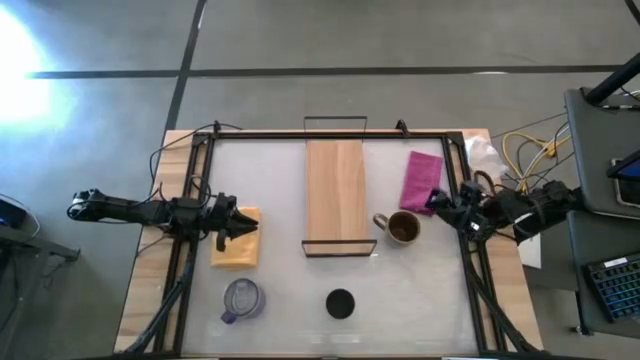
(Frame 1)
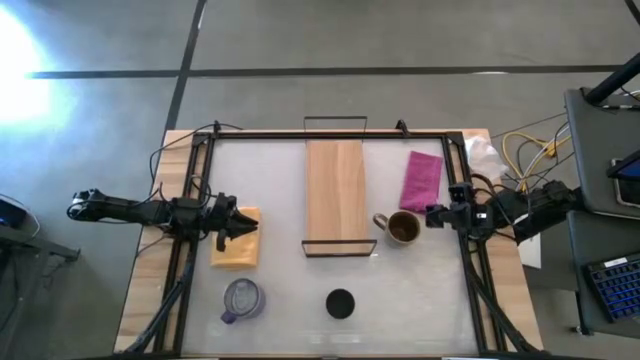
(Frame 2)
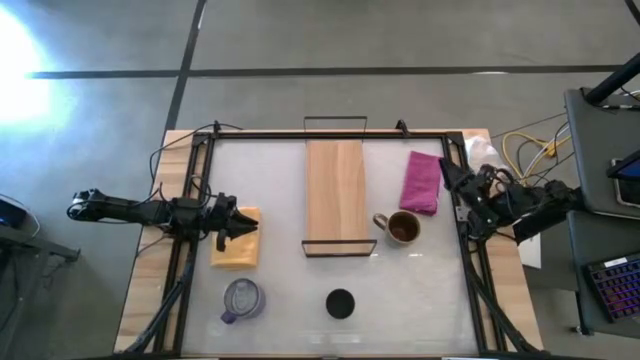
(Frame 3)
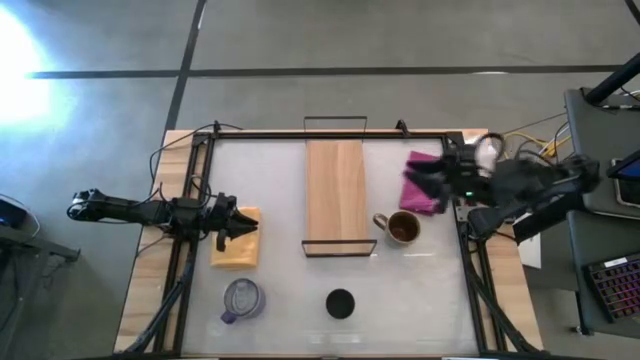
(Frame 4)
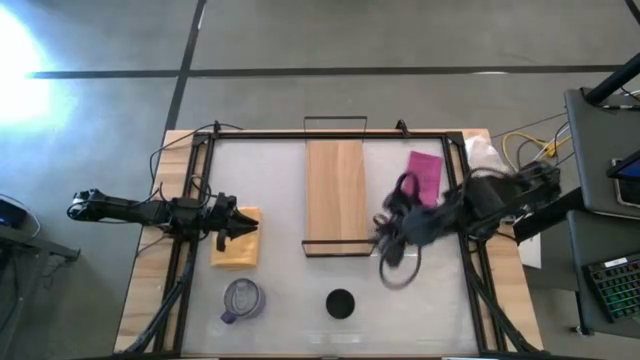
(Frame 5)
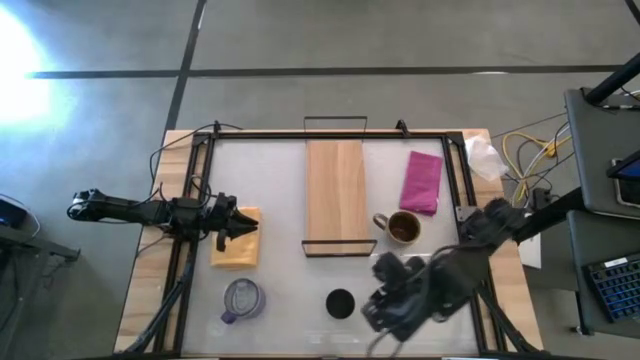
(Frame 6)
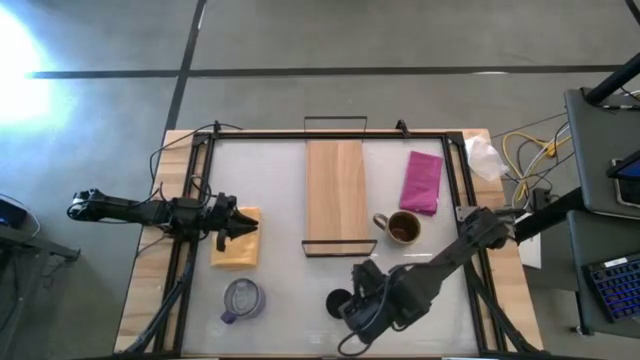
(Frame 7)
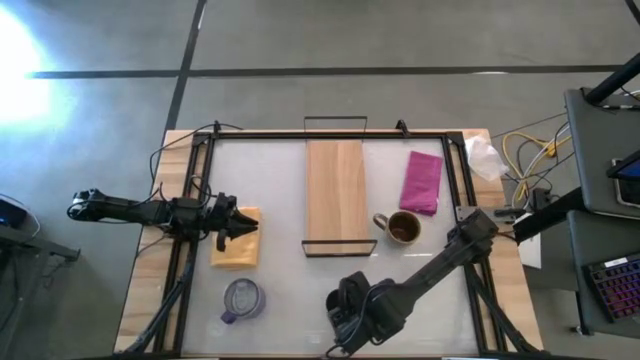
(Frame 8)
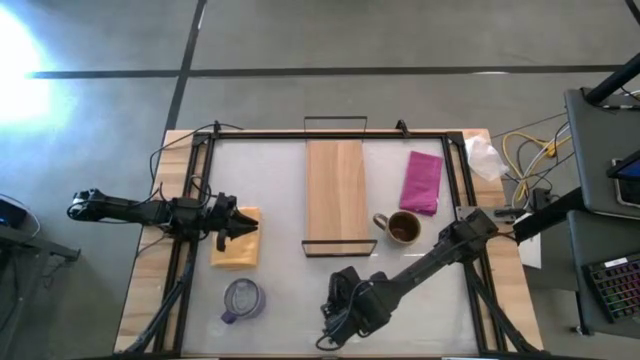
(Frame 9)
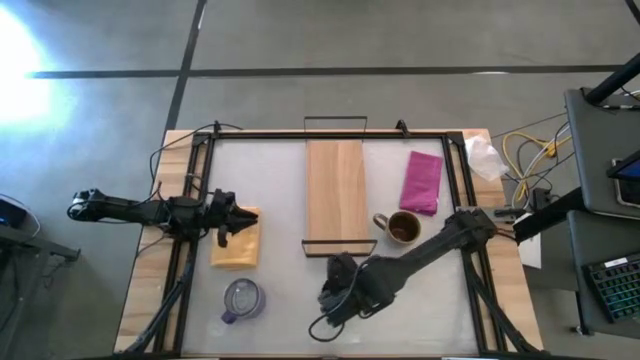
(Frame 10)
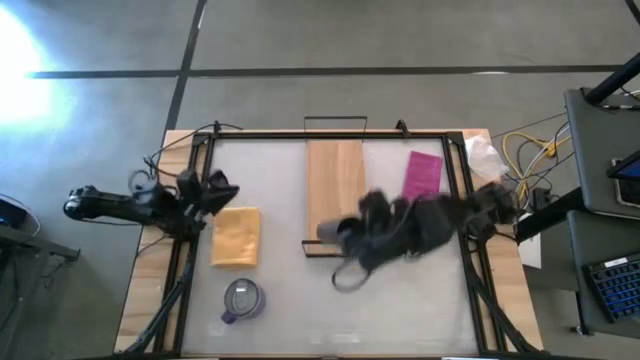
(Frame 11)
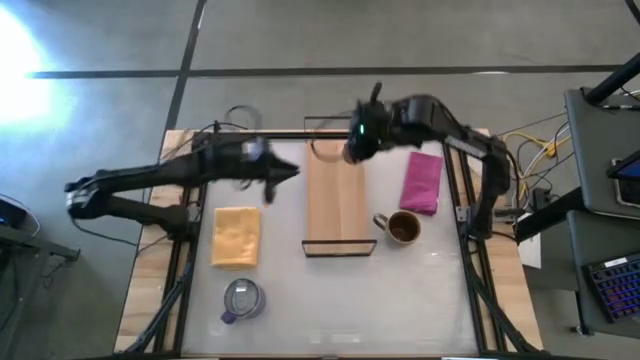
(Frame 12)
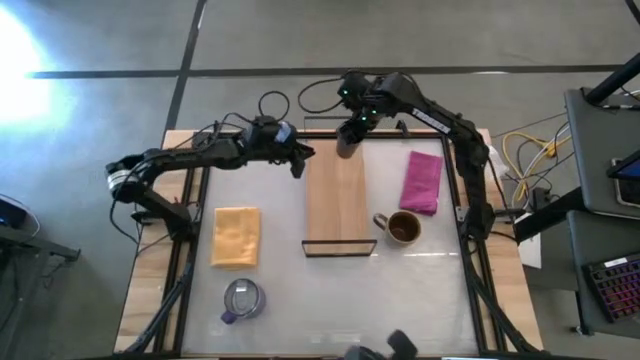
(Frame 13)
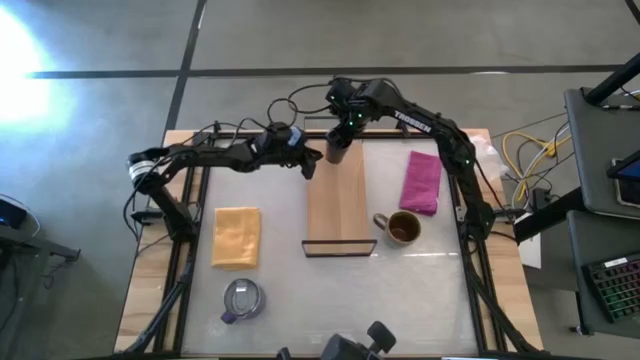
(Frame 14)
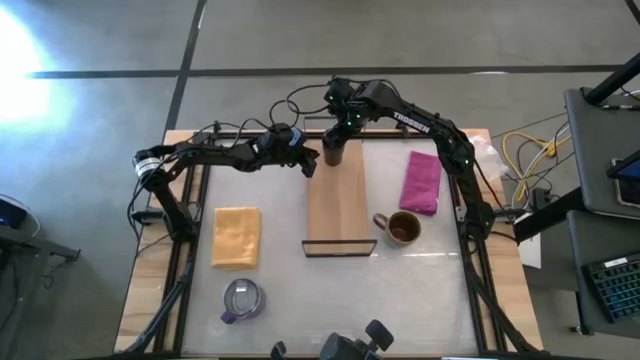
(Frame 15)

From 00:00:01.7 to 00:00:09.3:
Task: Stack small to large cups/mugs on shelf
Put the black cup on the shelf

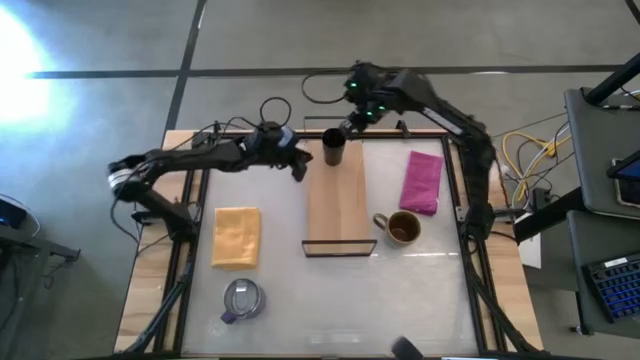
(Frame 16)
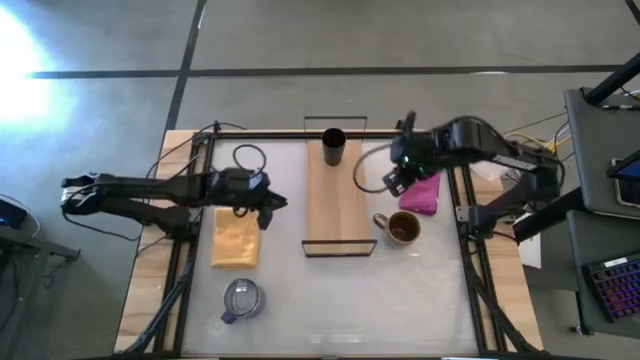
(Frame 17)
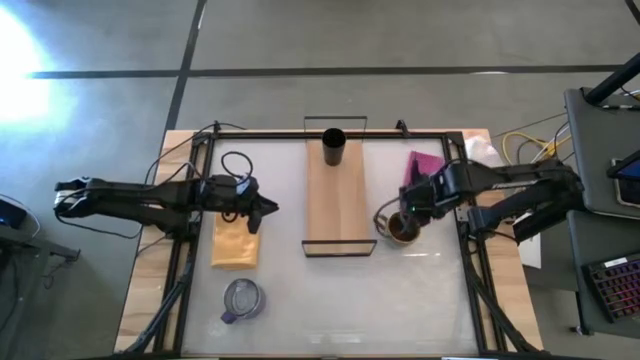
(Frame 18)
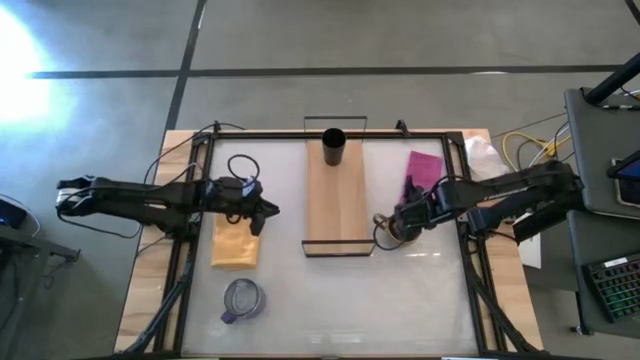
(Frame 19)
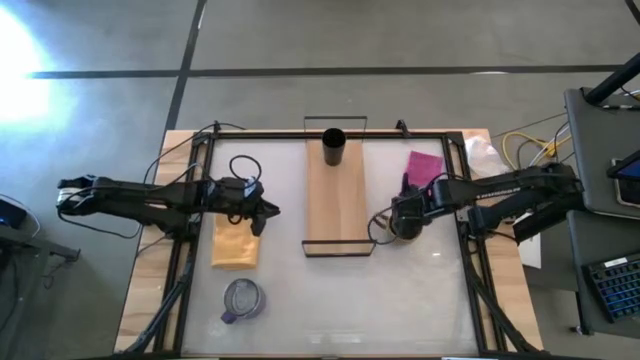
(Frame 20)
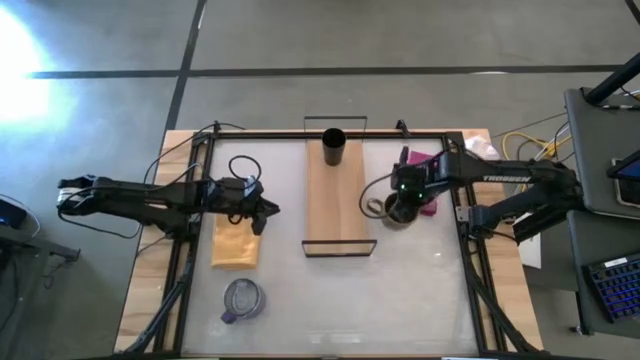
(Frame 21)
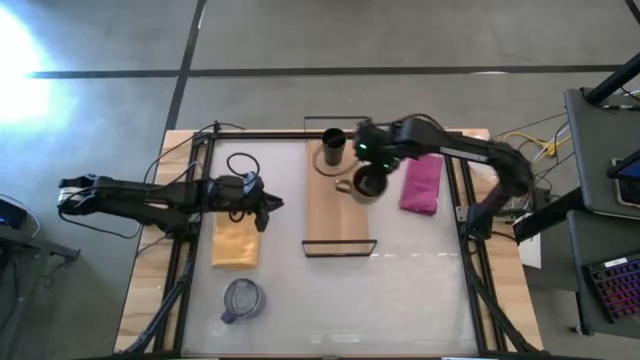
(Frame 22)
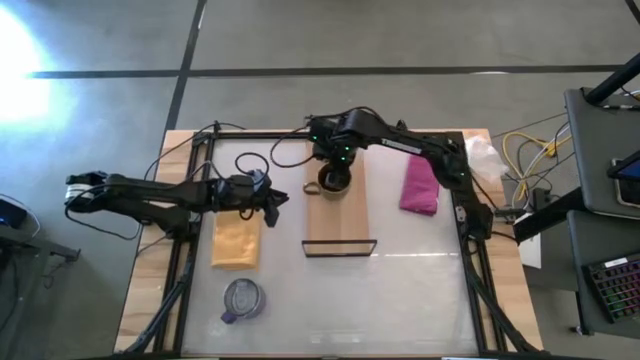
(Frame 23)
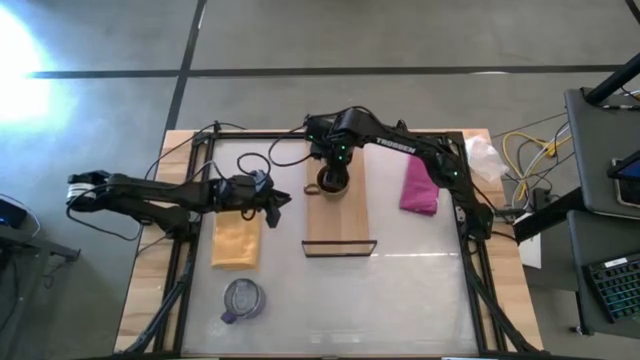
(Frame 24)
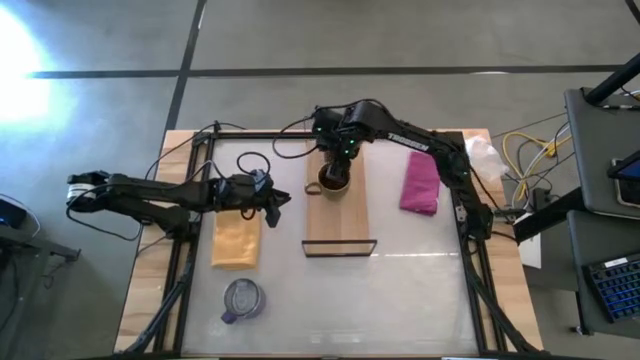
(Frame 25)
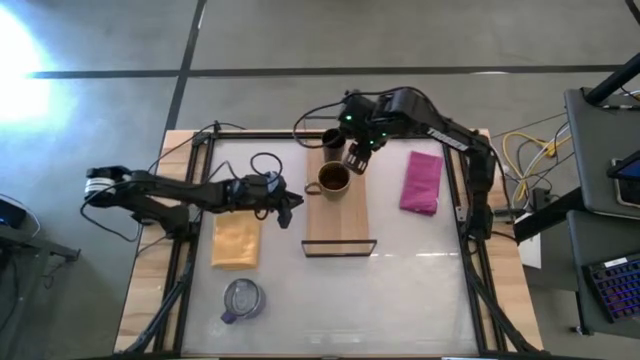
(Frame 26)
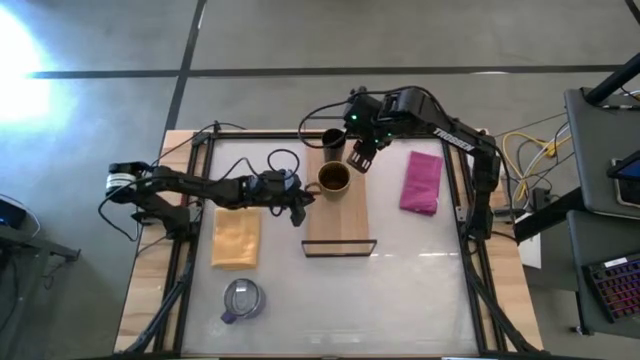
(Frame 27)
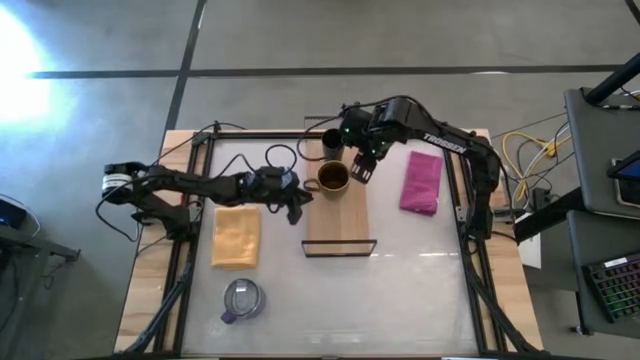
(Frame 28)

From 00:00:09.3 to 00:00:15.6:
Put the green mug on the shelf

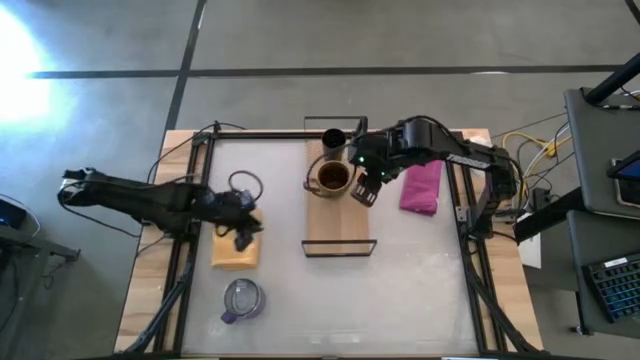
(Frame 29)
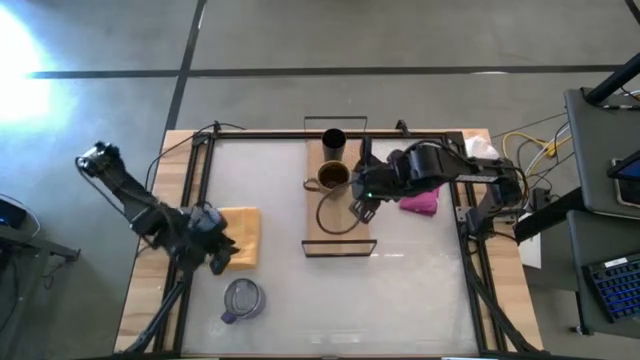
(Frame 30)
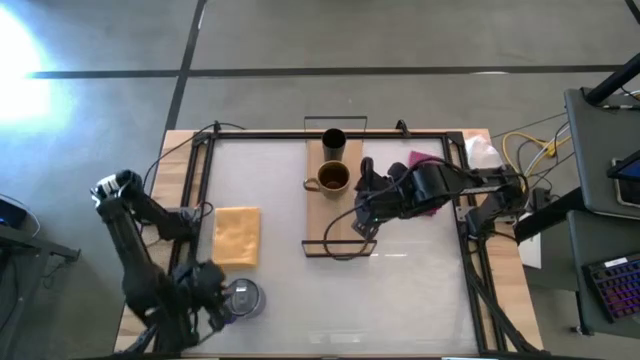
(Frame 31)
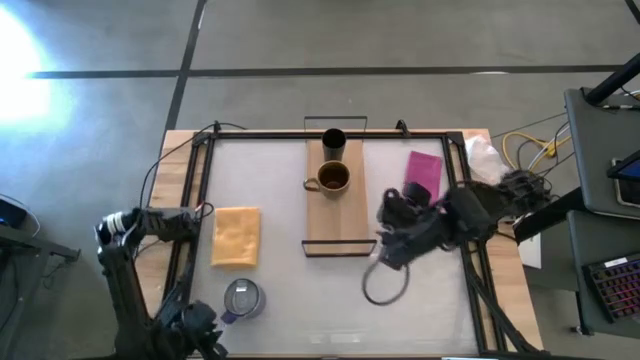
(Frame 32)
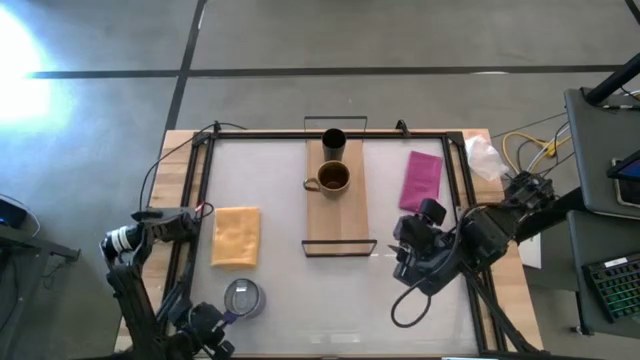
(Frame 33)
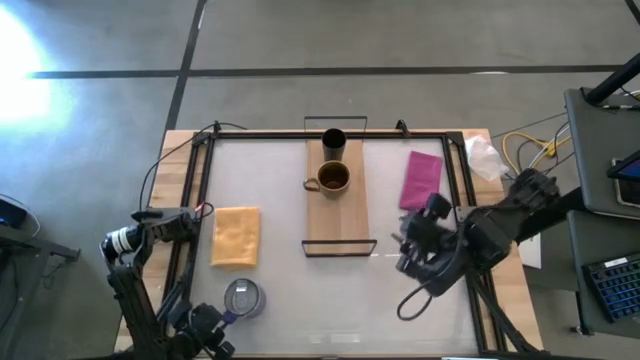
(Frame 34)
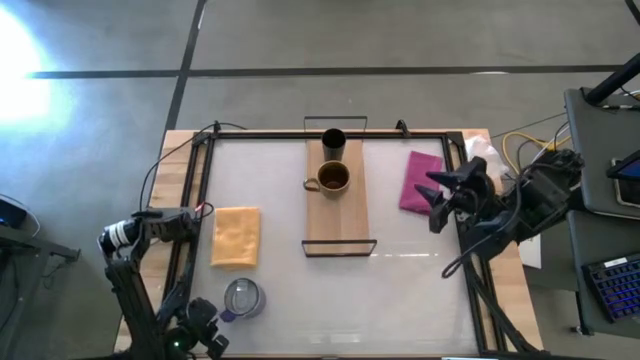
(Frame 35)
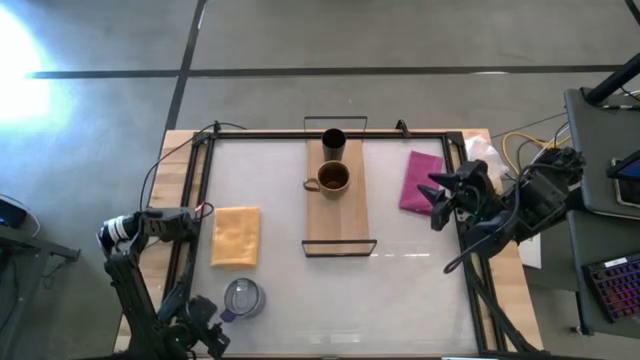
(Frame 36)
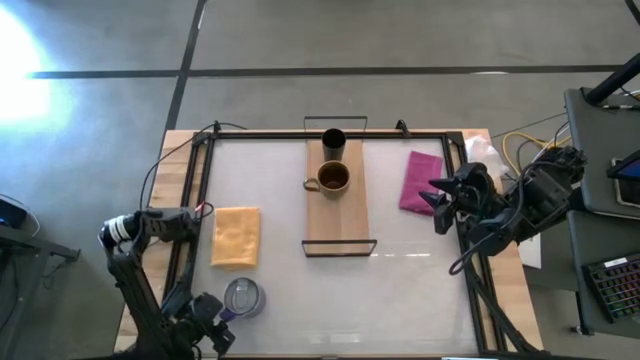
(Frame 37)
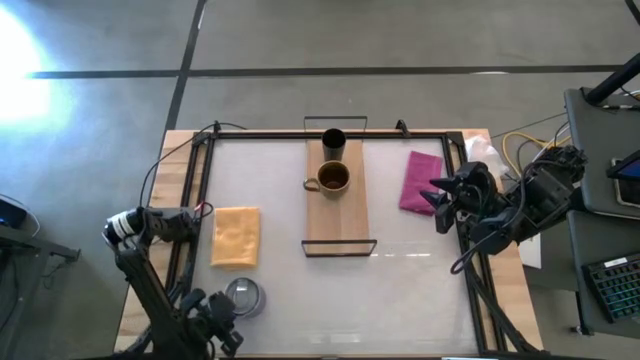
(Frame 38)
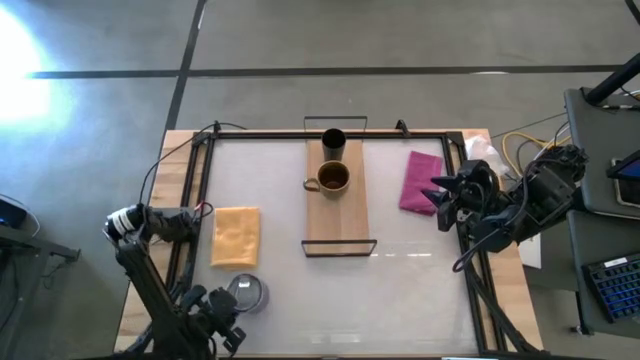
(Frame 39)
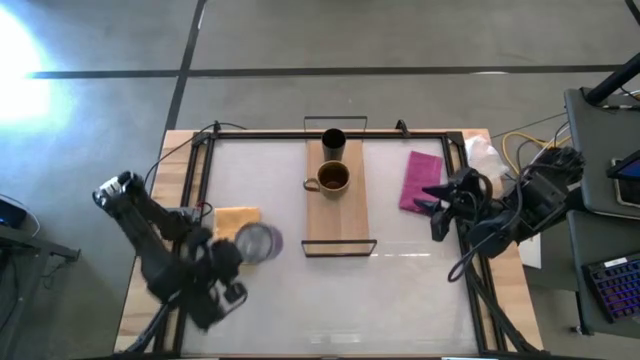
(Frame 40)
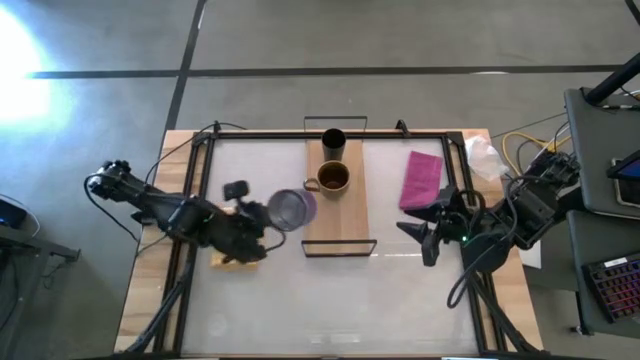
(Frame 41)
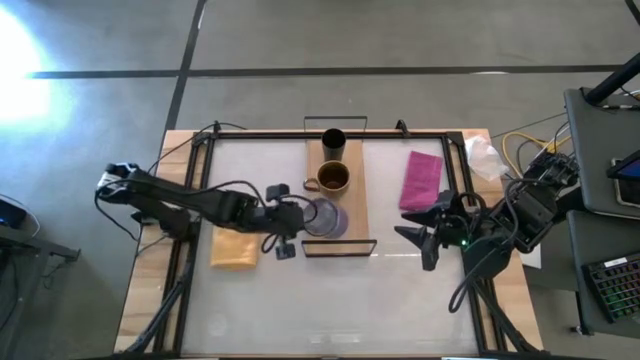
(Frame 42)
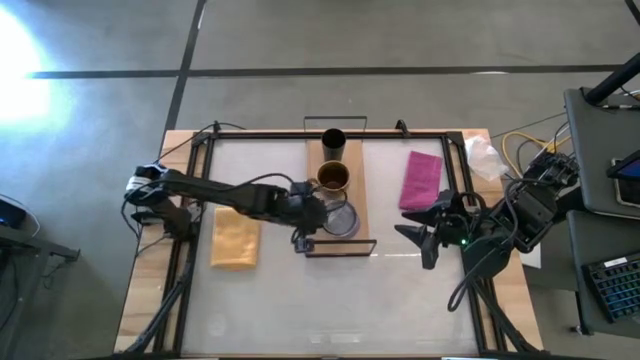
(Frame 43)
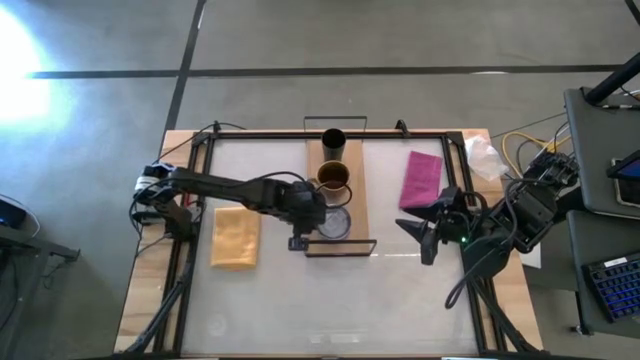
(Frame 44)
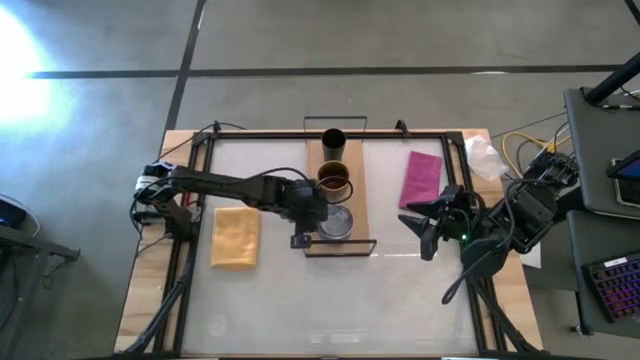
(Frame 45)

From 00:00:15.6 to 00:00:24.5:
Put the purple mug on the shelf
